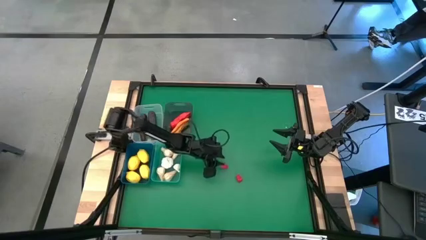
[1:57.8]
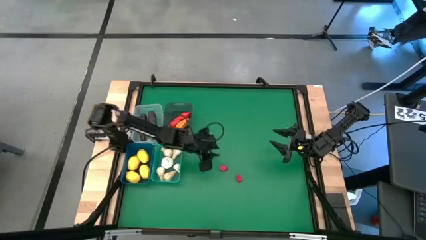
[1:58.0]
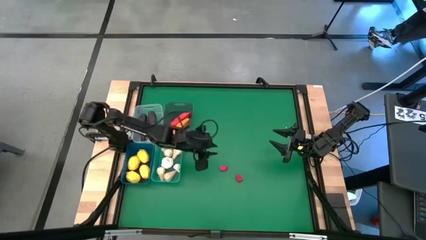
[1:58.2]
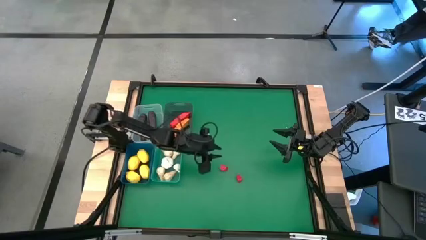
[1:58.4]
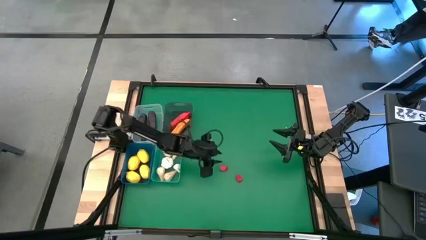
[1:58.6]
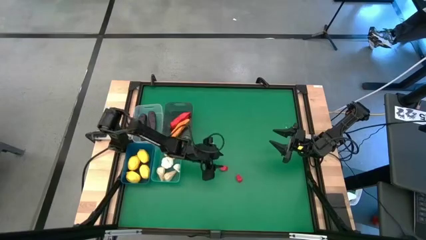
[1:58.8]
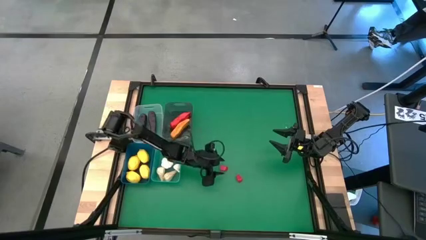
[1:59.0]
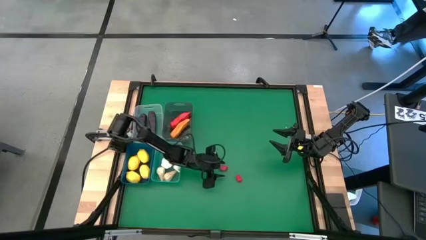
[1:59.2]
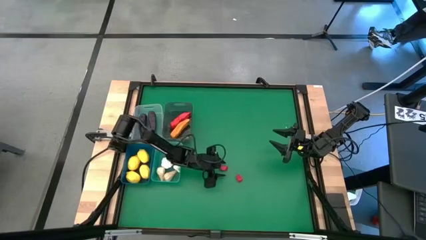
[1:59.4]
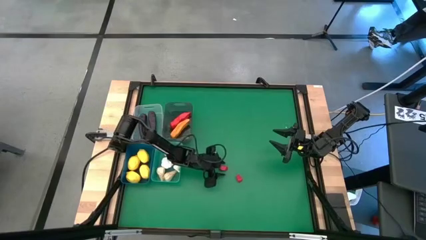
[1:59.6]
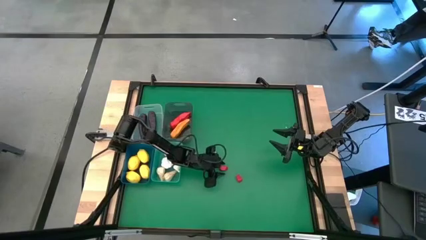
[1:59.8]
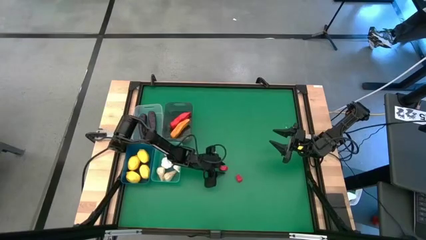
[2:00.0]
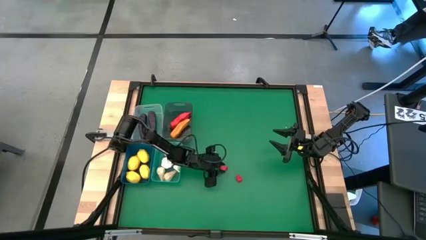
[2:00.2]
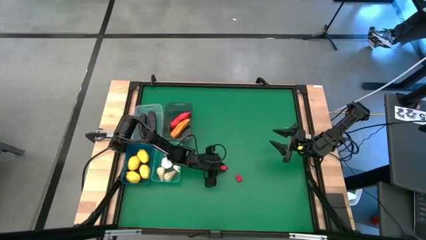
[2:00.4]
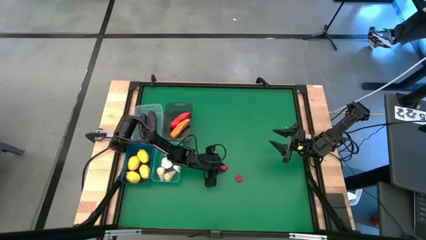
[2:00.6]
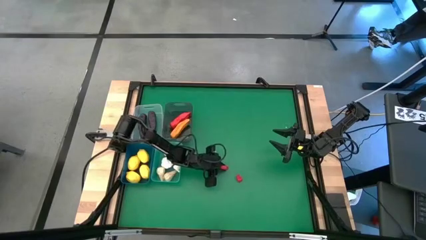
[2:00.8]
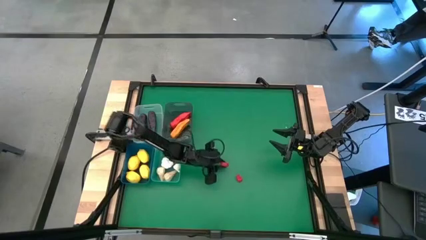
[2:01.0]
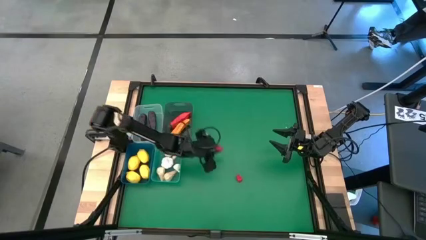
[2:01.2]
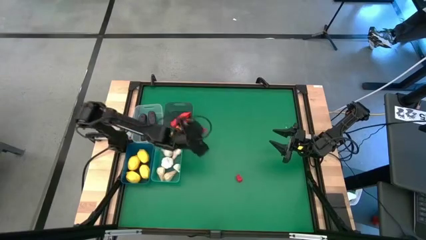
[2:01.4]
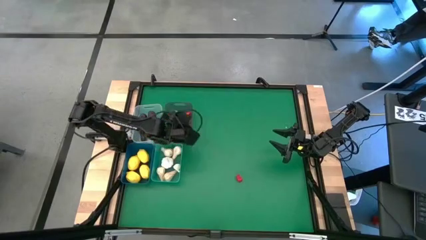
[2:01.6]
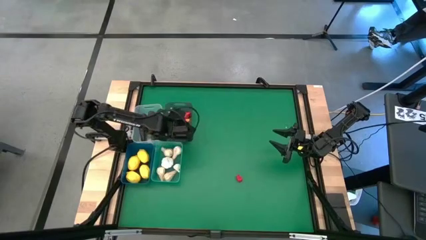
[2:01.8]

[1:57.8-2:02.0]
Task: Sort produce into baskets
Put the red chili pepper into the black bin

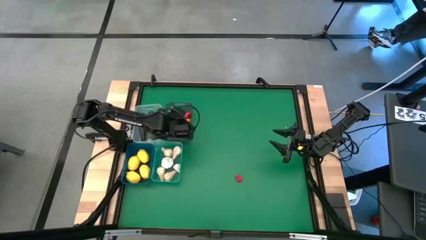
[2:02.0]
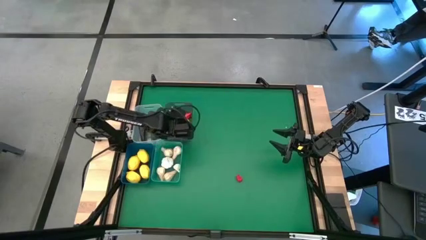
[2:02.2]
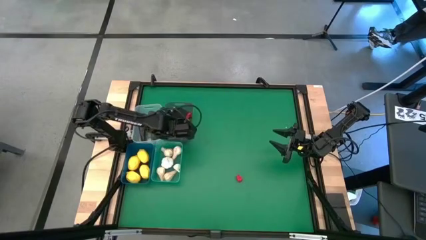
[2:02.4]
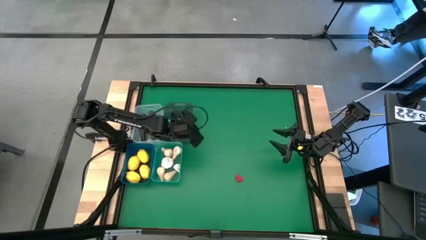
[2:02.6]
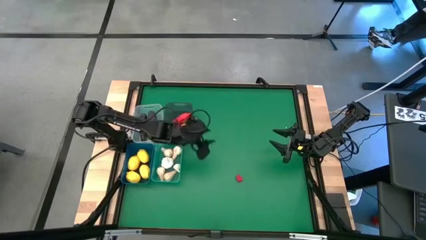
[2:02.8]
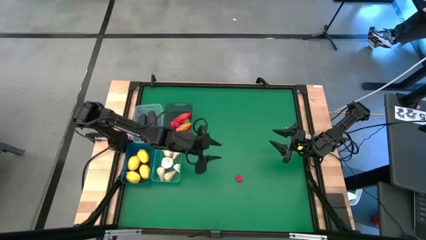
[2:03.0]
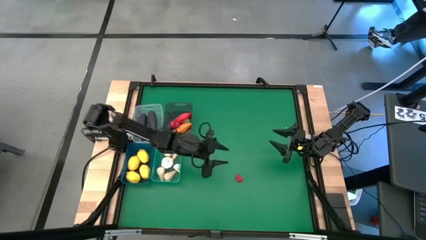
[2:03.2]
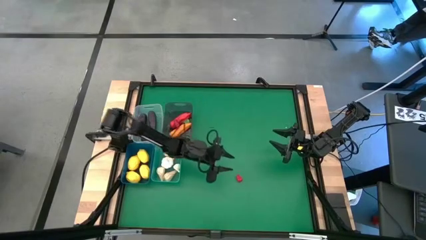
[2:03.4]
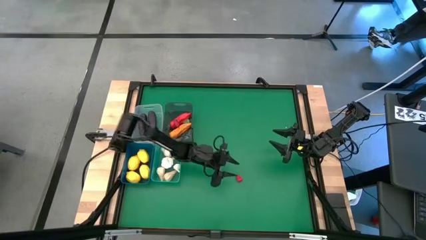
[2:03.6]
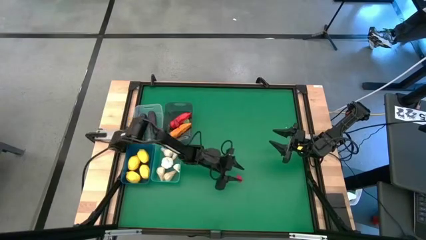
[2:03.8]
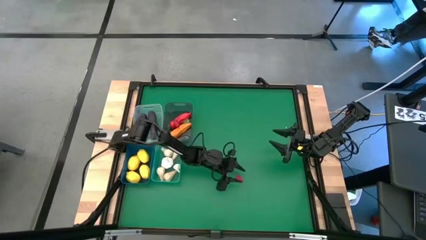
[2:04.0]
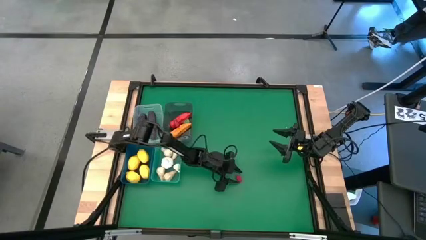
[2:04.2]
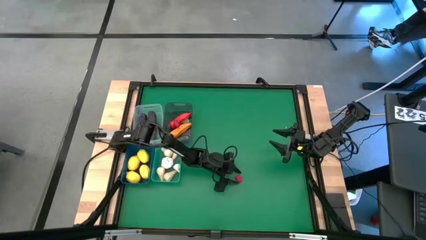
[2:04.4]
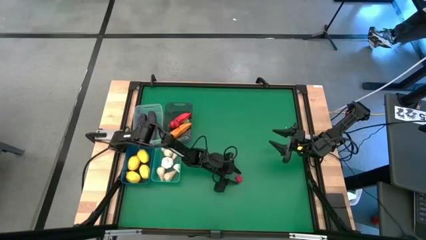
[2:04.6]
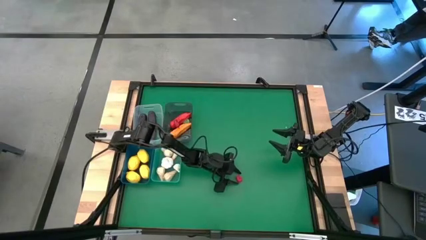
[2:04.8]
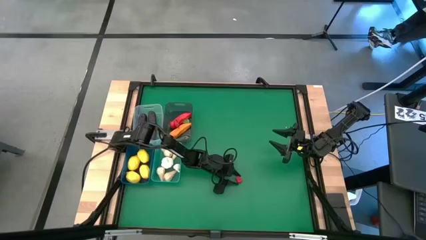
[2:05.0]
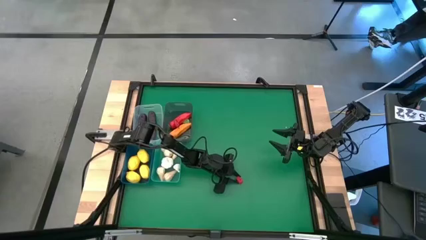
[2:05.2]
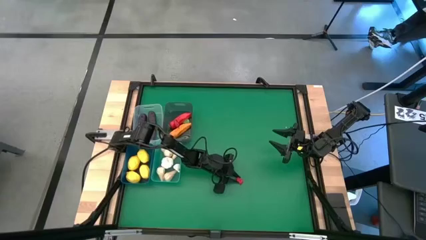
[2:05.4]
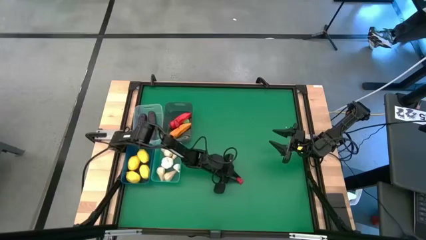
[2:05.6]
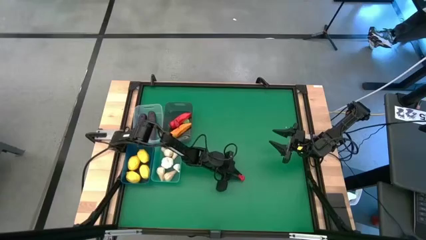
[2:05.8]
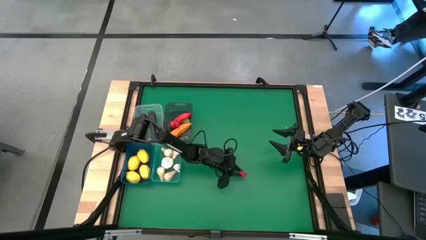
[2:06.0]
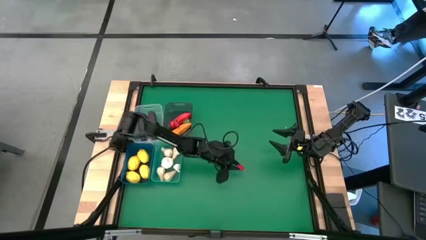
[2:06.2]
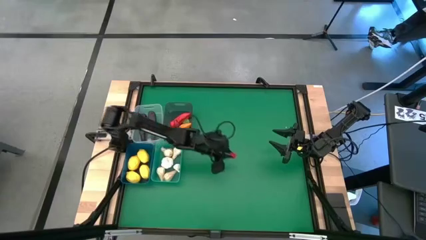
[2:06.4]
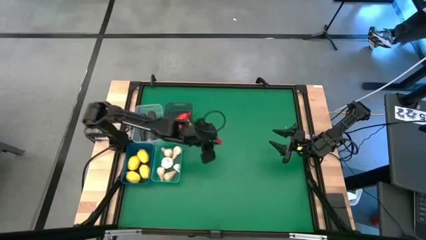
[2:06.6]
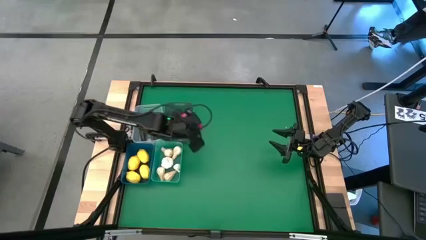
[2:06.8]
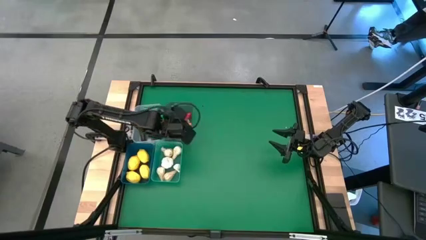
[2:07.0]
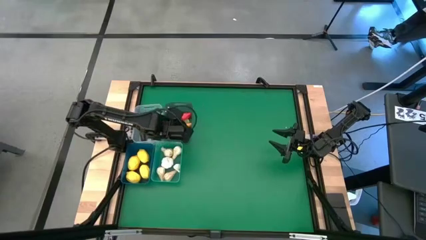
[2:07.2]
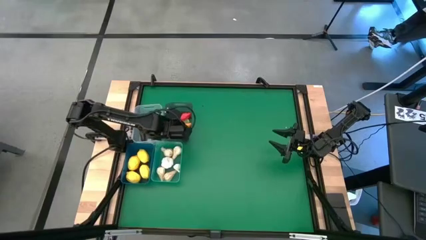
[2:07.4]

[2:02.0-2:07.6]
Put the red chili pepper into the black bin

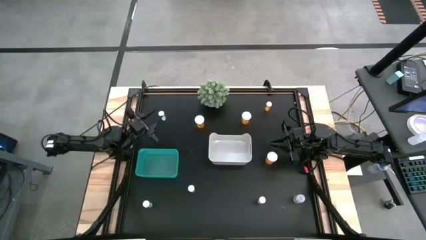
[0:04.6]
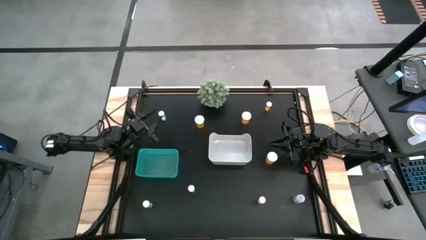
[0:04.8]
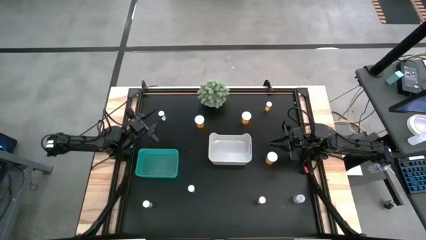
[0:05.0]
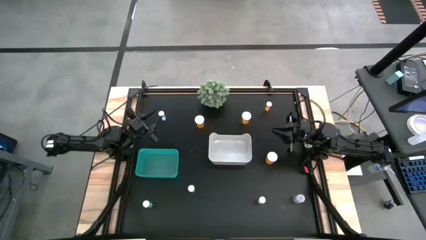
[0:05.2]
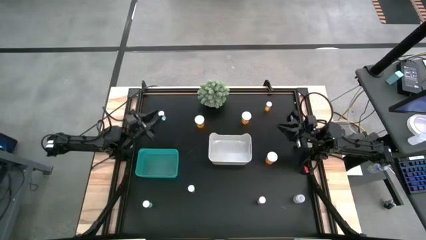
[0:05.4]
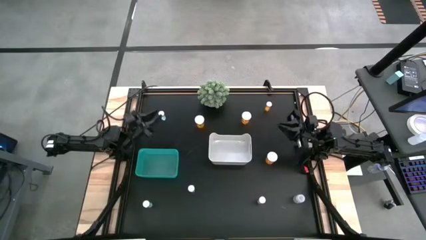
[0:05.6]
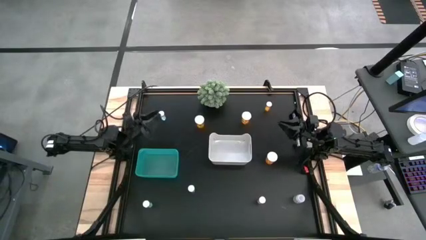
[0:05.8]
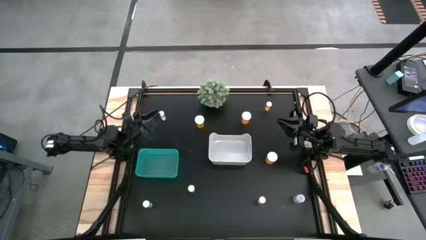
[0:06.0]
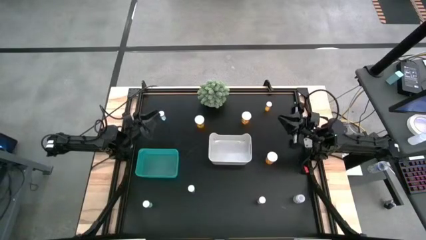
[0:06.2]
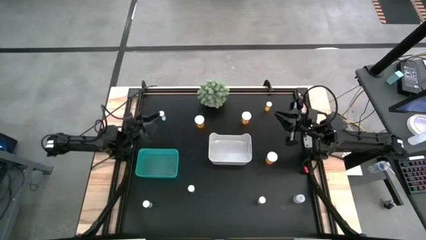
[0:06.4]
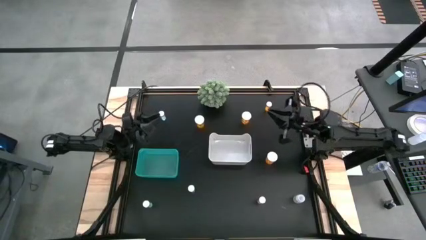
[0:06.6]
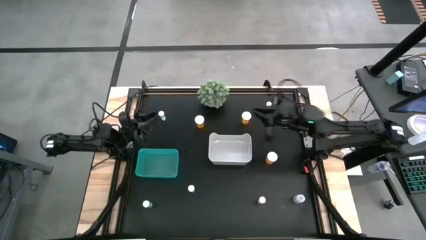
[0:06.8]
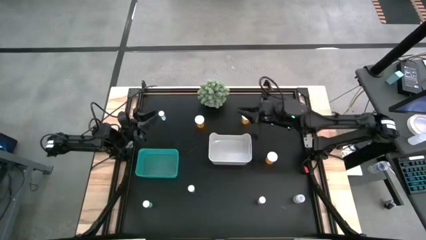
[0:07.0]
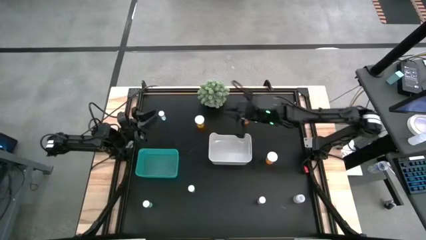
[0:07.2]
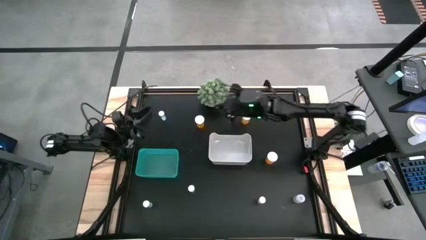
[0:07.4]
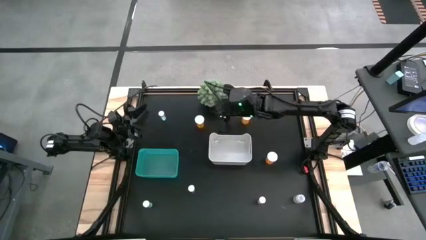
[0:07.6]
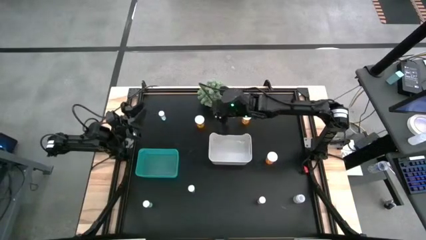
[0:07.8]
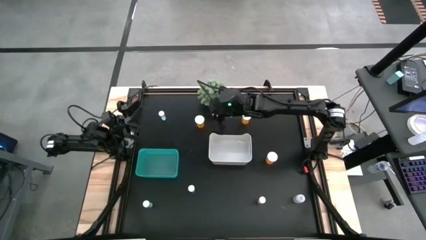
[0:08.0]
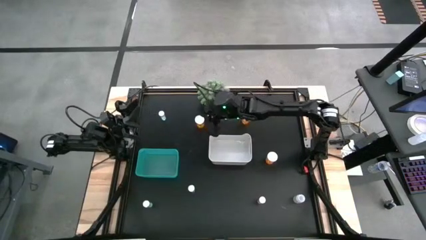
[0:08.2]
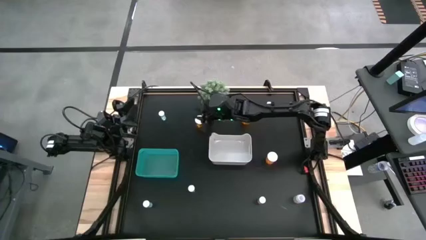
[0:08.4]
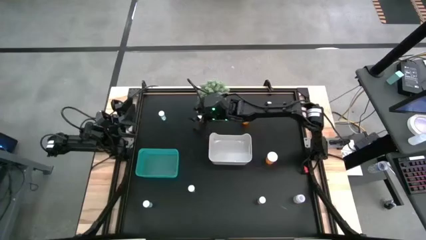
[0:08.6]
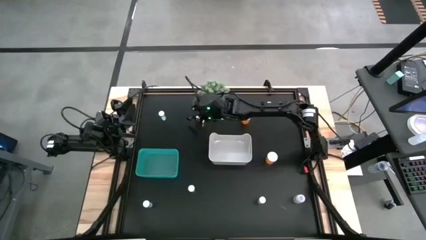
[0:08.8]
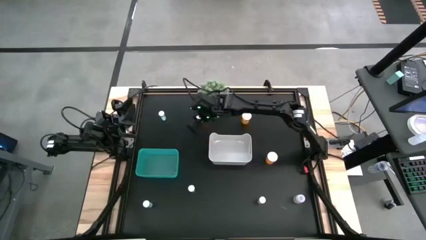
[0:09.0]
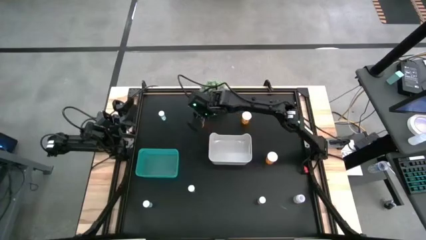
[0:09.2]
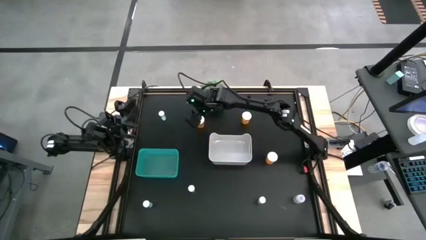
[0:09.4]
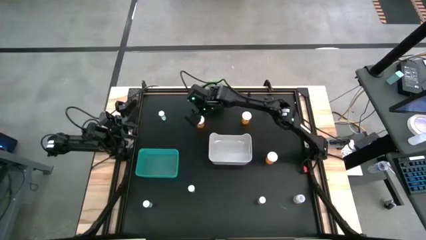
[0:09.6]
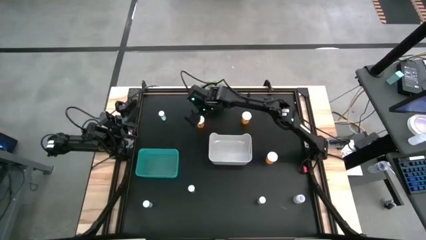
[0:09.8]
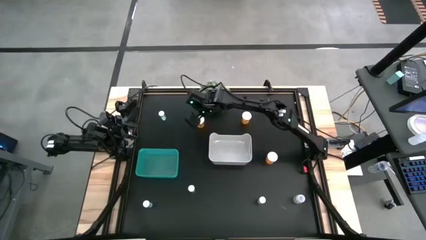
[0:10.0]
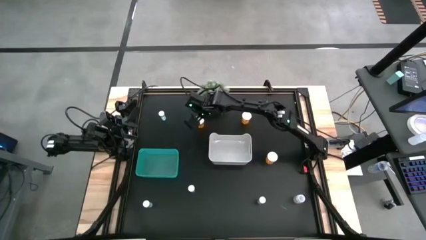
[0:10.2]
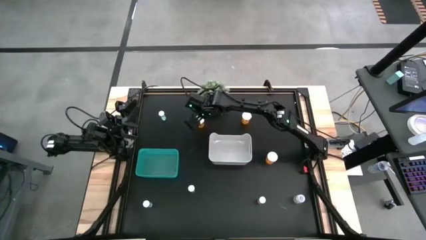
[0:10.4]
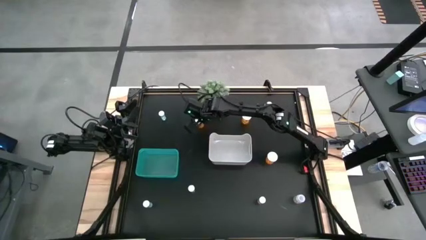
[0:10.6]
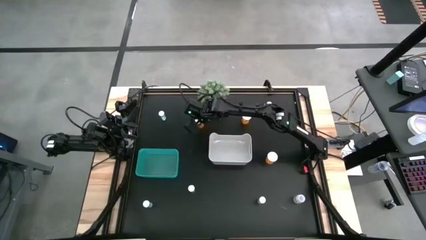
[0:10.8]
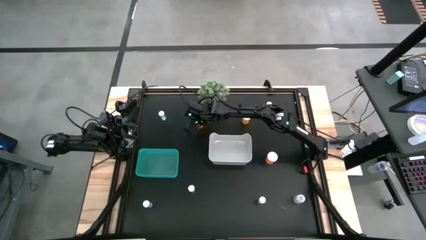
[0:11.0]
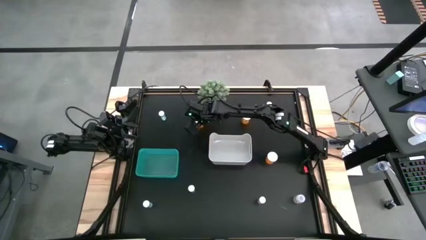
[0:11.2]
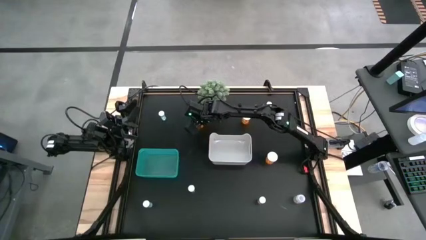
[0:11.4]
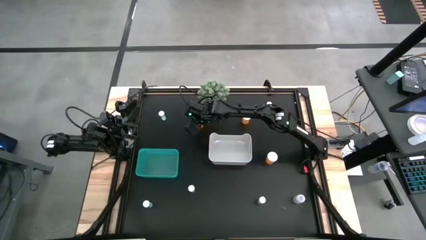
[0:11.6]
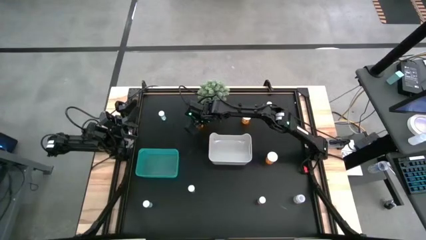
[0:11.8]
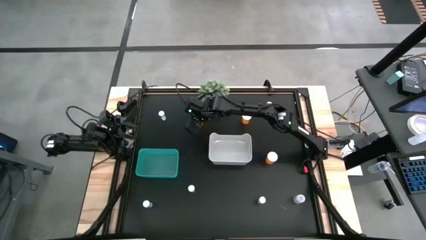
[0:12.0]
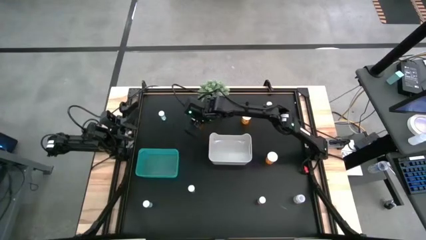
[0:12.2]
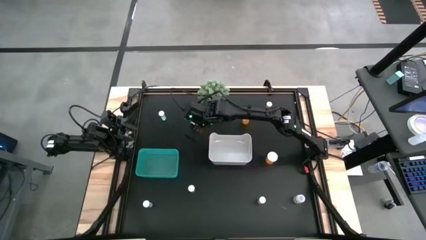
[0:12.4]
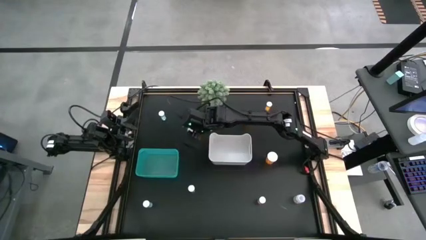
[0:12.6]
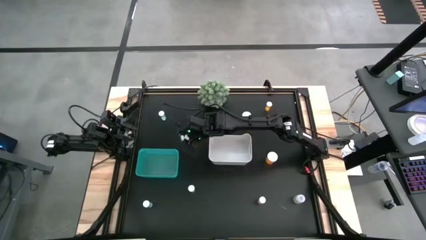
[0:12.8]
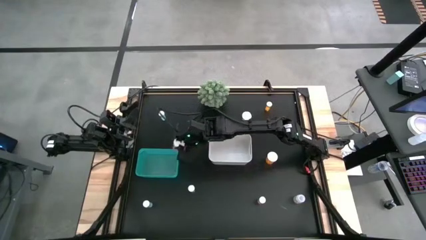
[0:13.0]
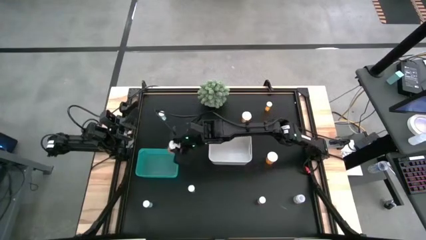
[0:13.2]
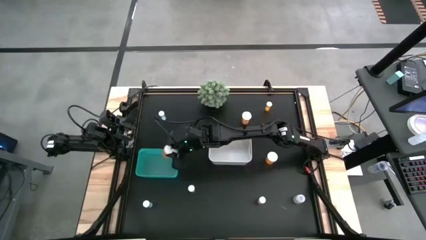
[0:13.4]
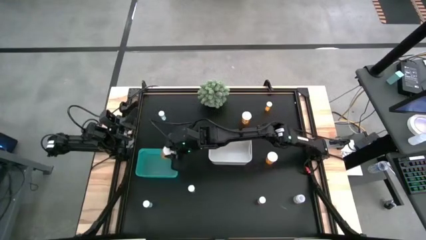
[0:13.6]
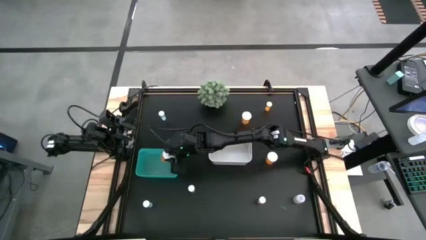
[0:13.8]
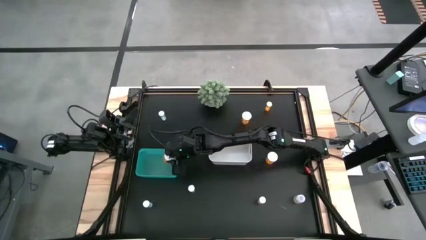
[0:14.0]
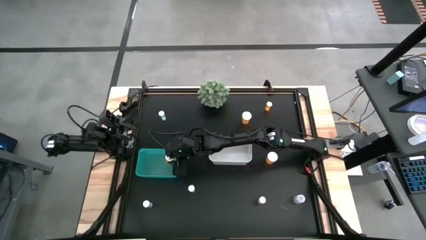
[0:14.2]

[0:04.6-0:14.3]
Task: Pick and place medicine bottles into bin by pill shape (circle, oval)
Put the orange capsule bottle into the blue bin
